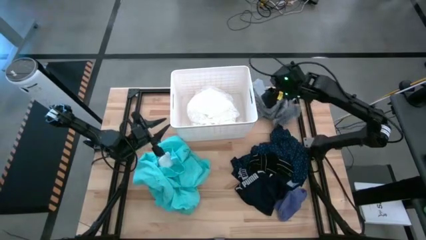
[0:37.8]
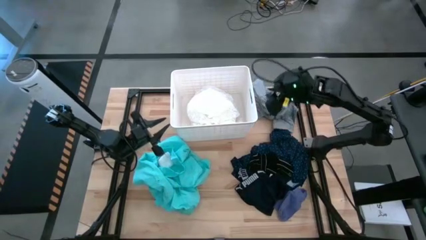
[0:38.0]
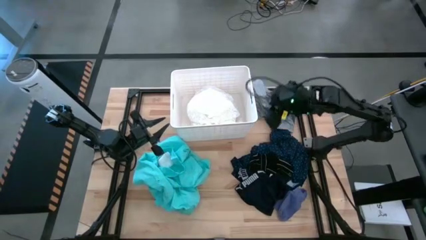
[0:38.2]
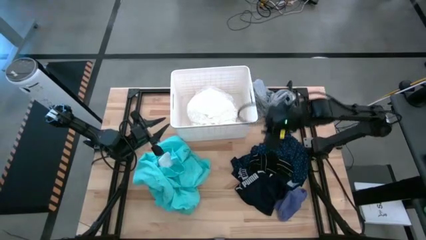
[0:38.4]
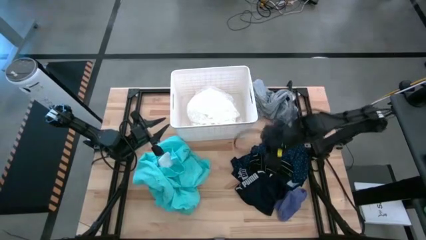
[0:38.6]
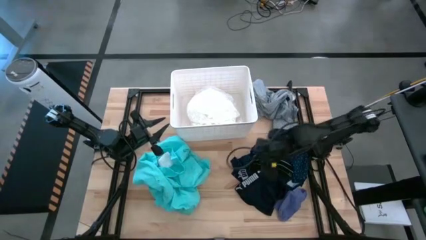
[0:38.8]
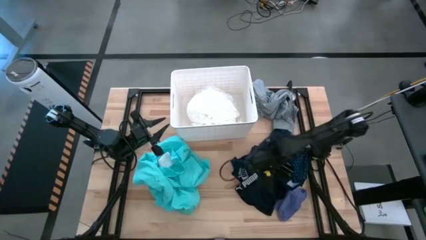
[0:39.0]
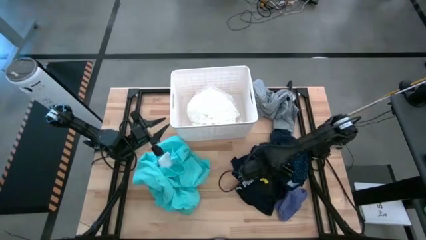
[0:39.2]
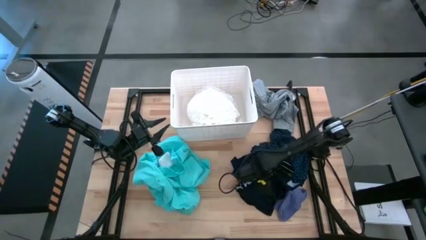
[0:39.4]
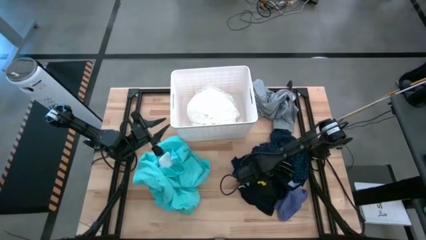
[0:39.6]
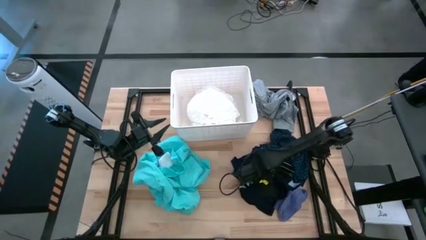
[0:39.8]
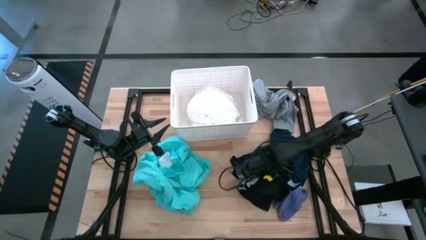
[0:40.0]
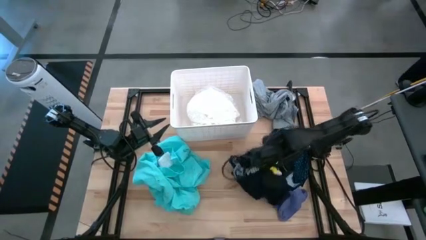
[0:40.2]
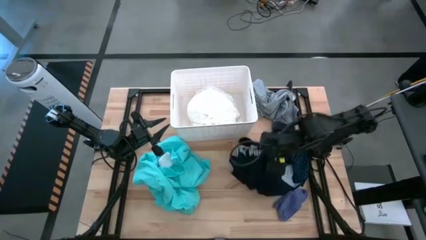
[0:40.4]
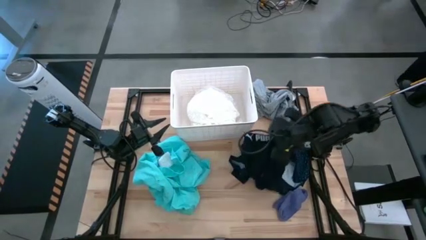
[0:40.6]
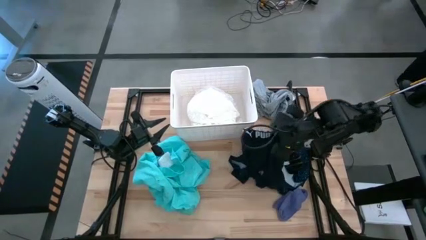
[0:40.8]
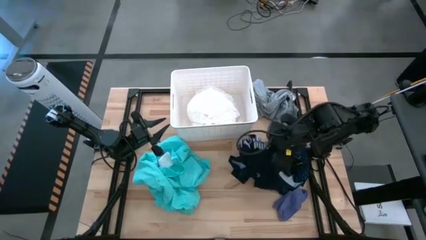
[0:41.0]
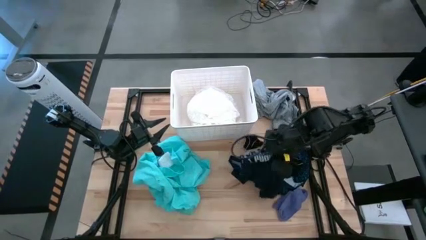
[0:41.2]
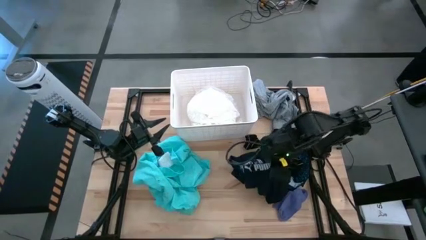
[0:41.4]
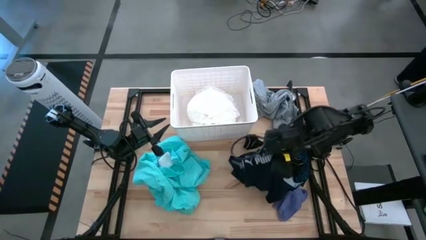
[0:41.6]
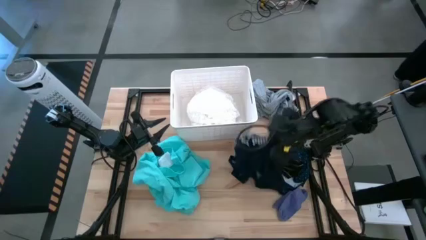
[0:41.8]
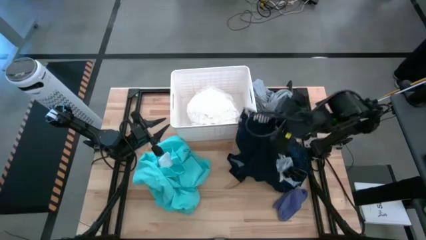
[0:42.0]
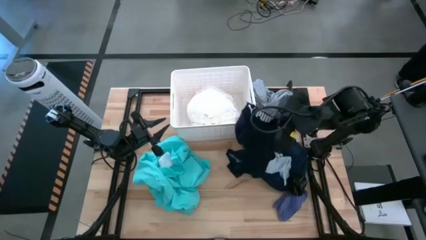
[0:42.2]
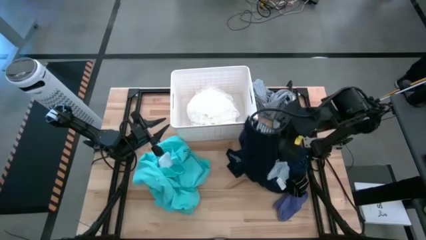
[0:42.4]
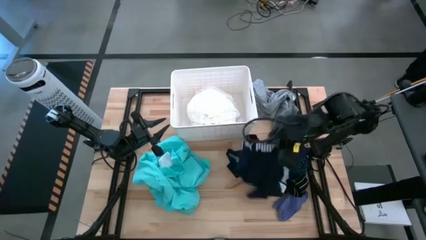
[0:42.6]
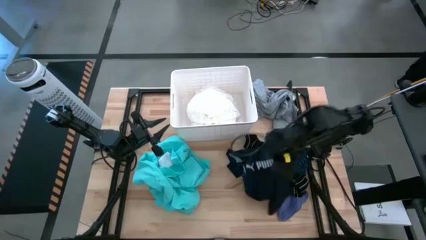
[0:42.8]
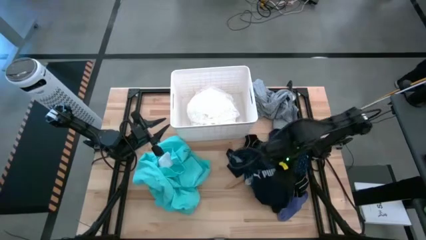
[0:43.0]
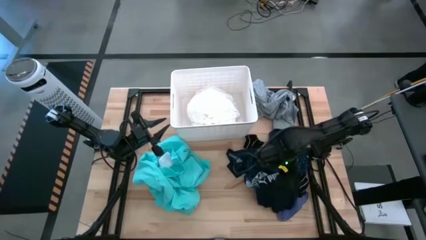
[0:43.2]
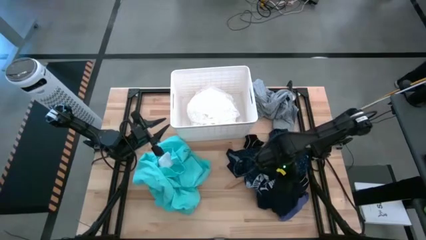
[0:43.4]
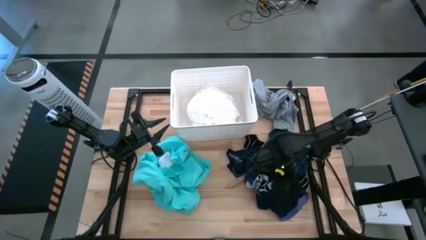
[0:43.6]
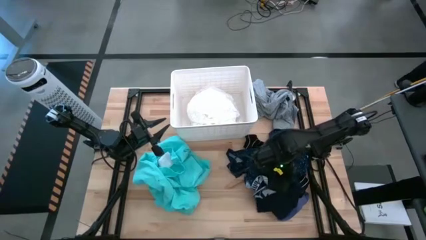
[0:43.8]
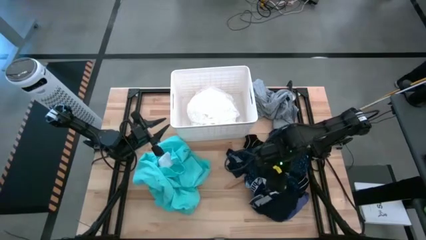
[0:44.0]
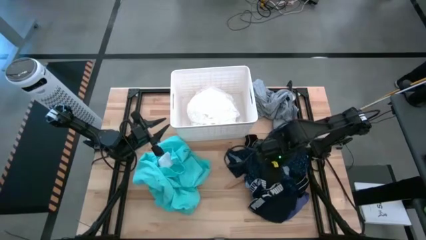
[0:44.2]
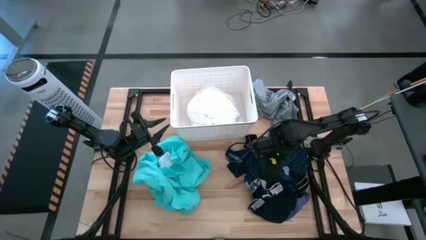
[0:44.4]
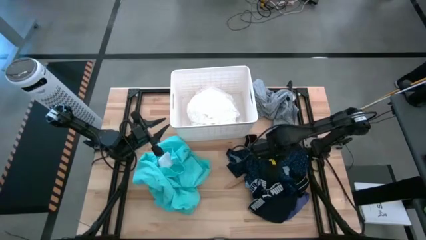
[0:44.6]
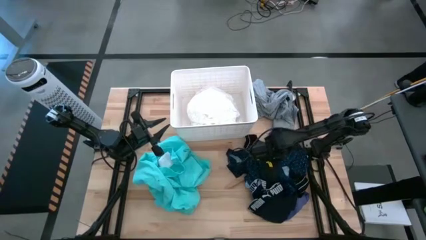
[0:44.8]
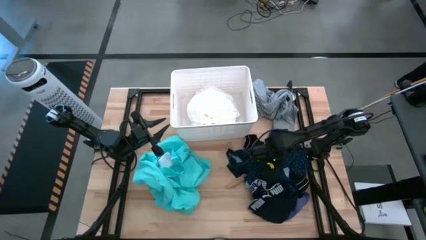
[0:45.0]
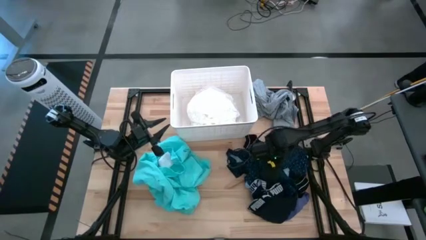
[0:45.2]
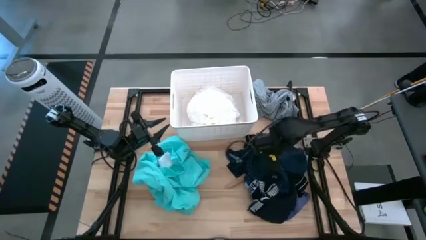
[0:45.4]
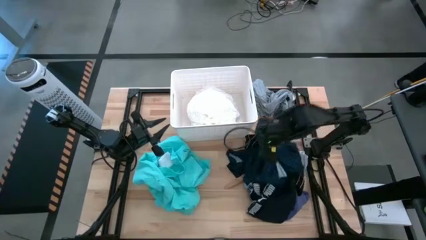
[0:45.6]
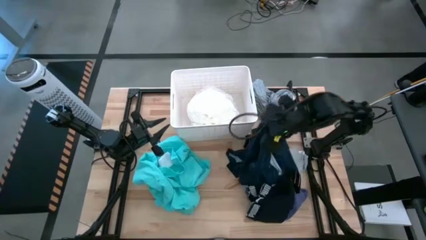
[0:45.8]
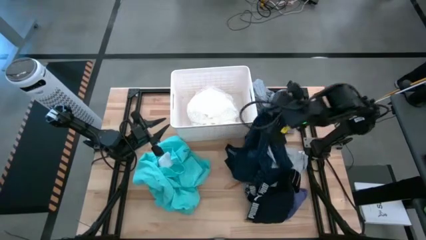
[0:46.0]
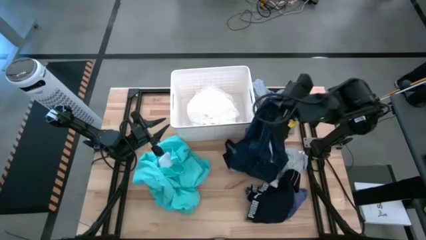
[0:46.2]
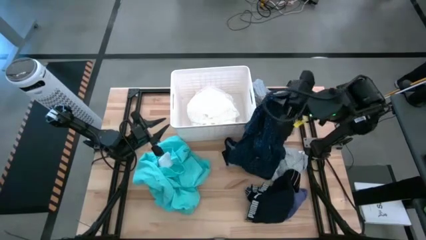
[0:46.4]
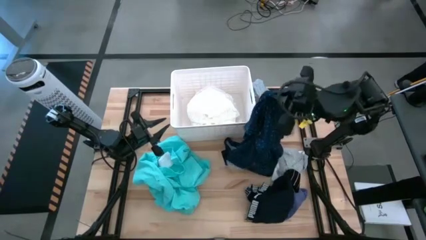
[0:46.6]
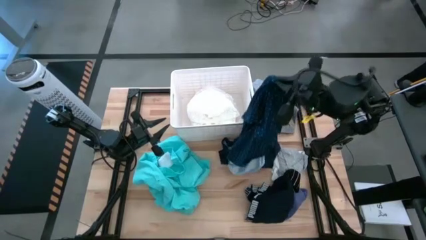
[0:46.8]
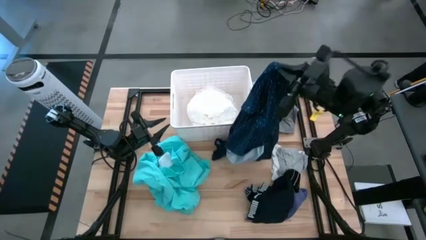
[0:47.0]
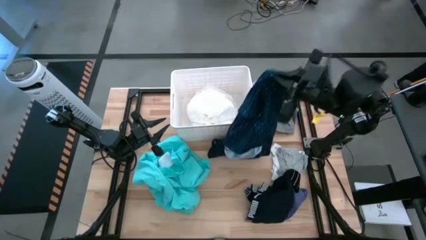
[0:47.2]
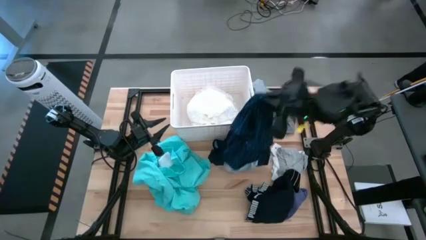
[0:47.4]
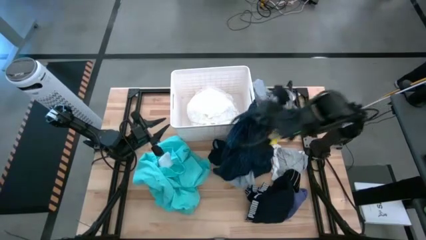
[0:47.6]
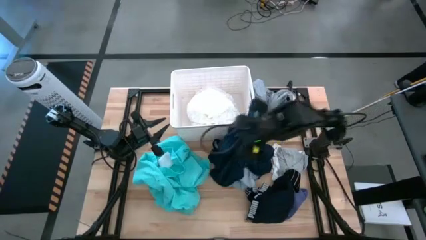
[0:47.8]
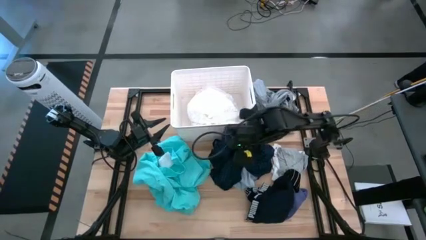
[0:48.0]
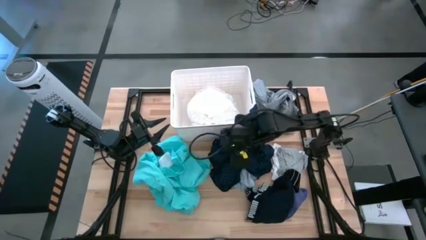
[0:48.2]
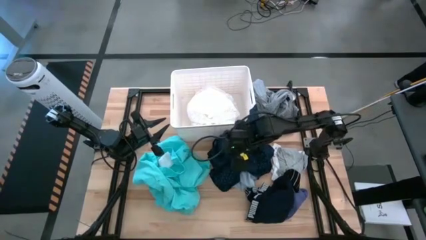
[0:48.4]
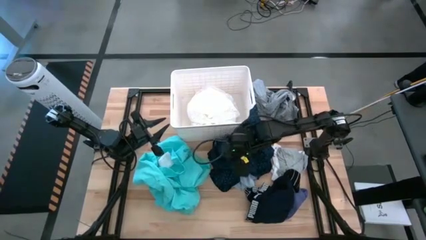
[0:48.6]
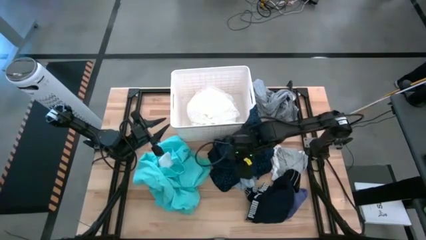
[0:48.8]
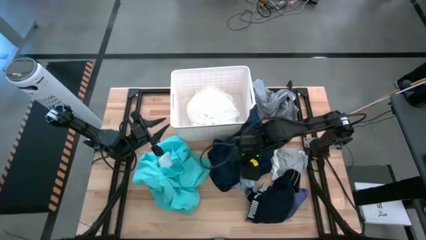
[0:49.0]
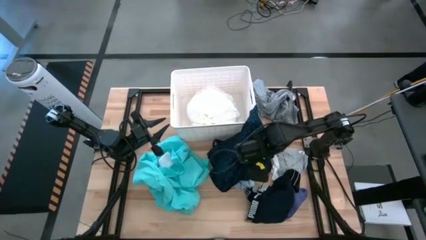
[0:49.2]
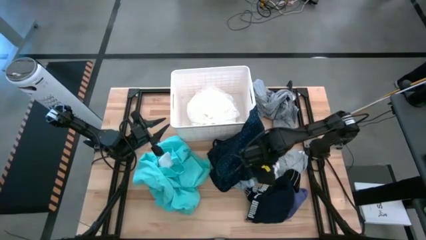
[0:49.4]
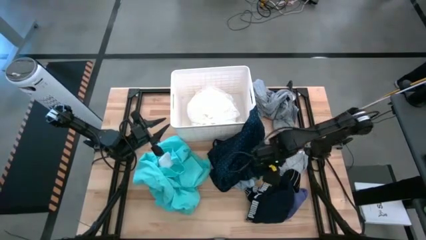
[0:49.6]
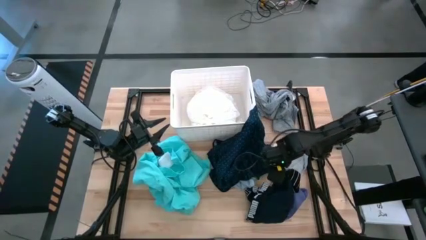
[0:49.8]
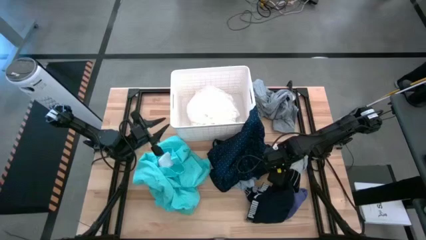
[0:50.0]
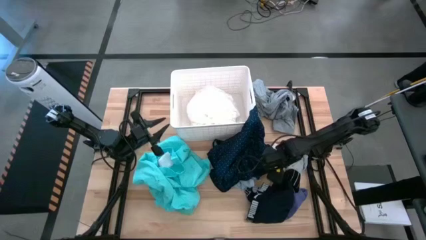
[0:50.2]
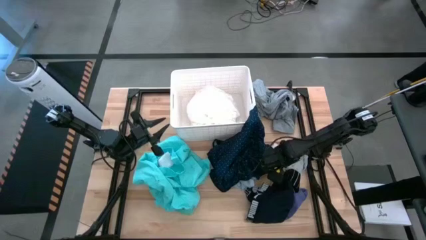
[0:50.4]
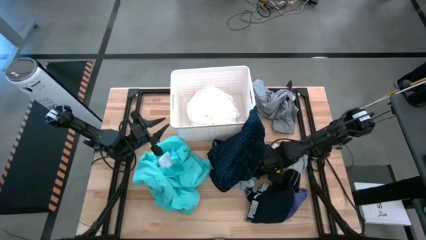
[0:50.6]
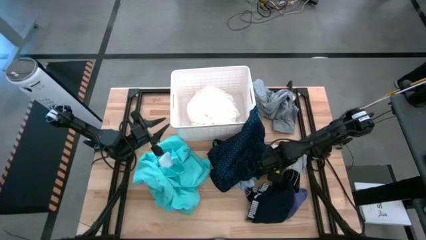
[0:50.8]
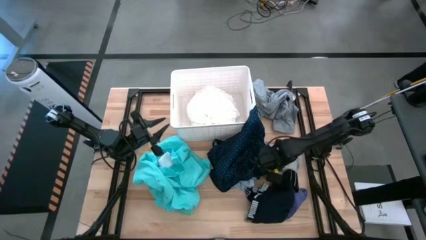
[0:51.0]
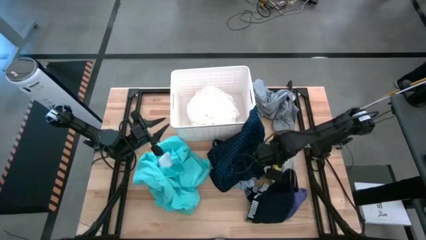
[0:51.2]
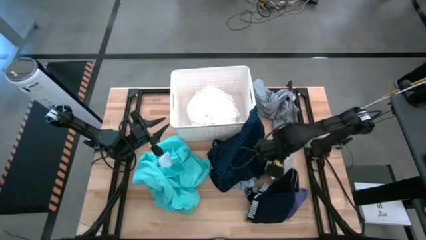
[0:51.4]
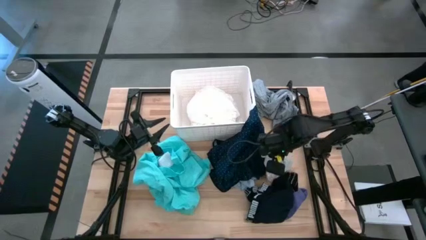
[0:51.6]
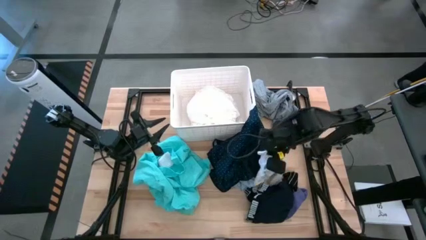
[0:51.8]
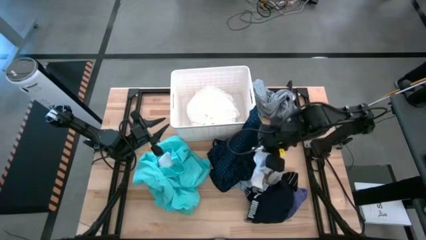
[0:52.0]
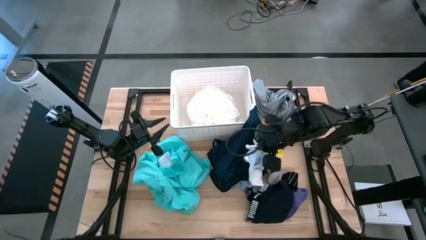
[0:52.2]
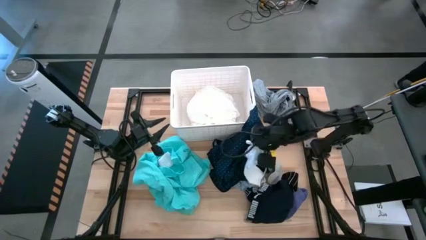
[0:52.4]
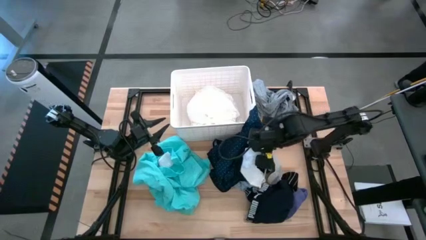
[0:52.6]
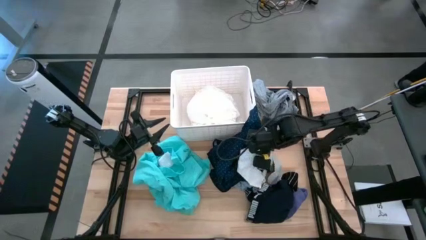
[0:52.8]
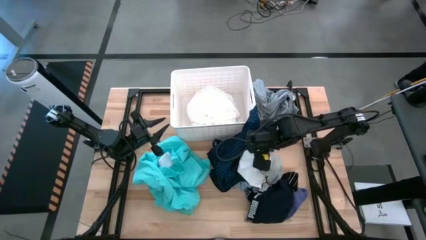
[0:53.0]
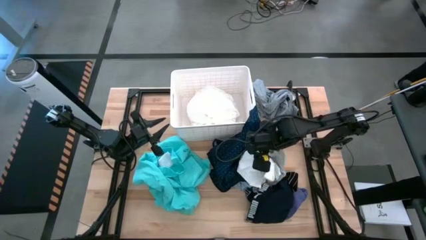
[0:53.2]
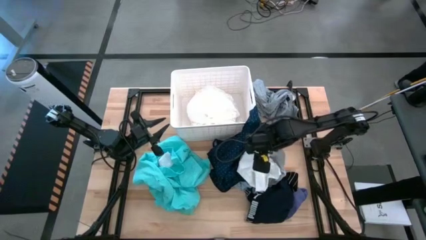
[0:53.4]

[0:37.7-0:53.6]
Task: Sort clothes
Adjust the clothes

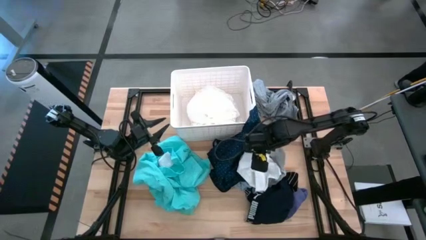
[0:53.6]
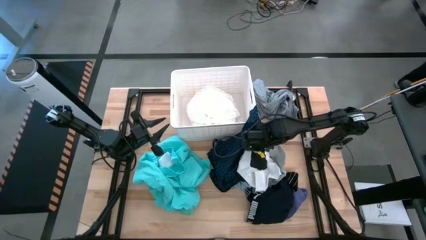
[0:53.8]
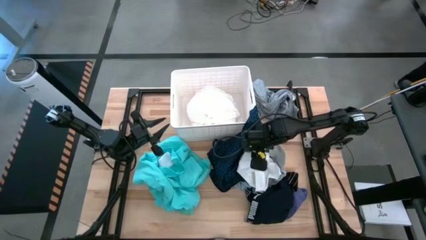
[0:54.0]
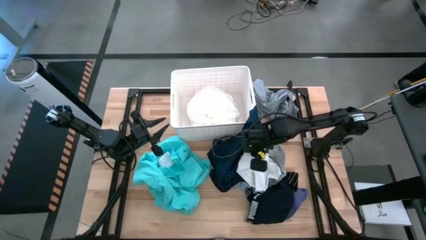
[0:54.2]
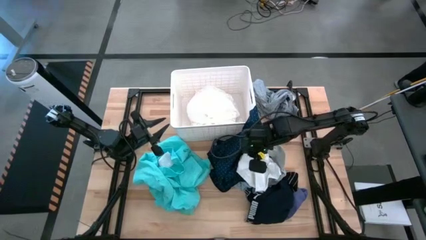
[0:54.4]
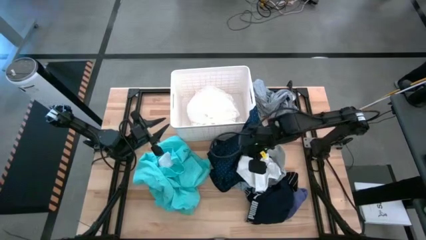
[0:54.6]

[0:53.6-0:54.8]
Put the white sock into the white laundry bin
